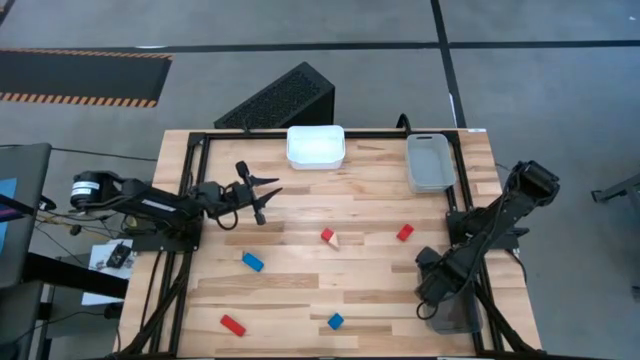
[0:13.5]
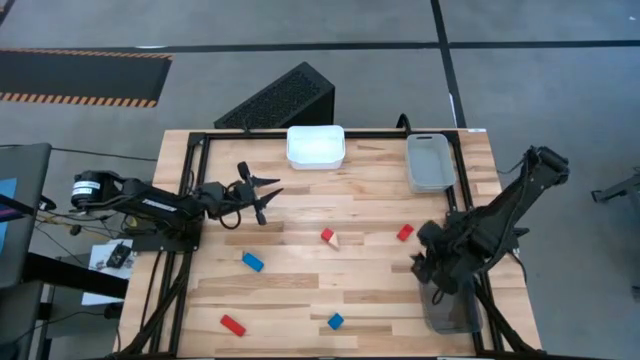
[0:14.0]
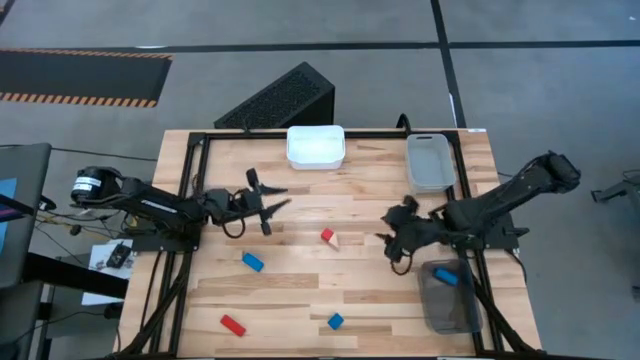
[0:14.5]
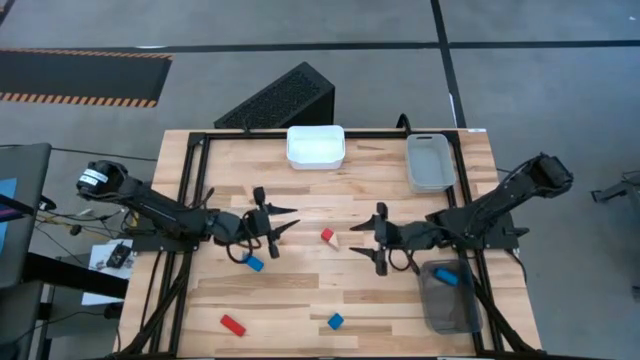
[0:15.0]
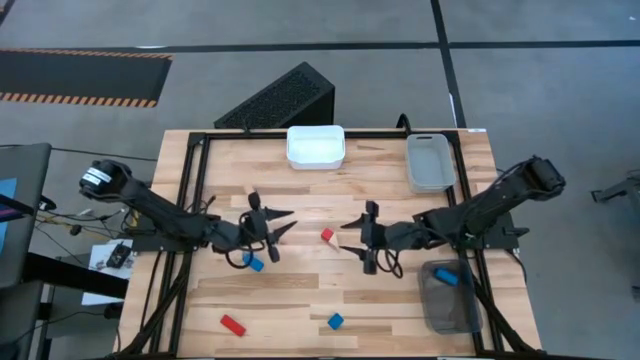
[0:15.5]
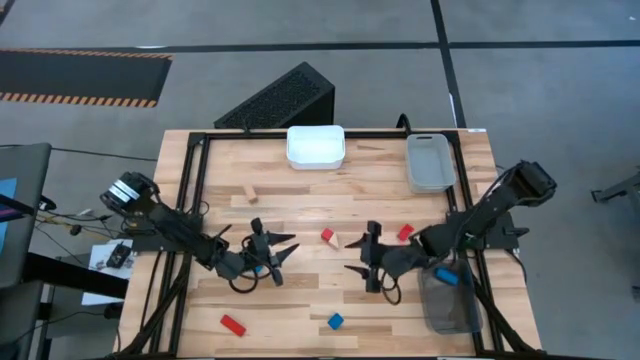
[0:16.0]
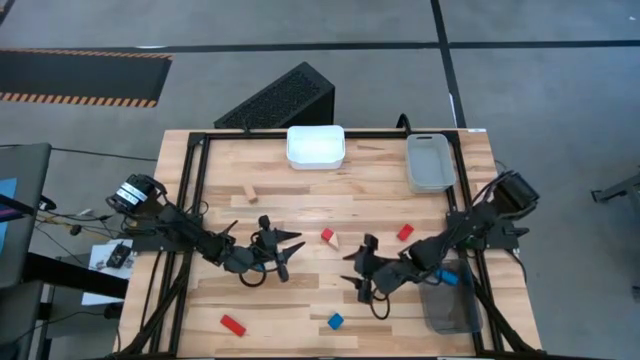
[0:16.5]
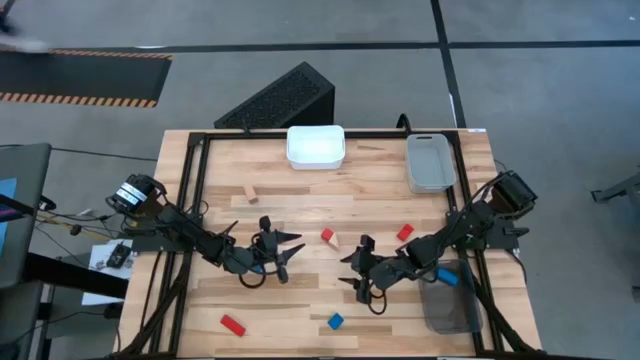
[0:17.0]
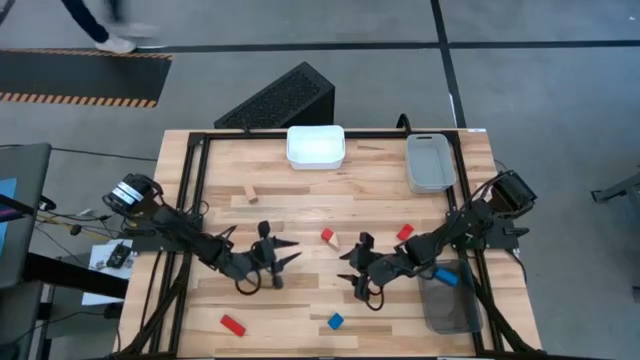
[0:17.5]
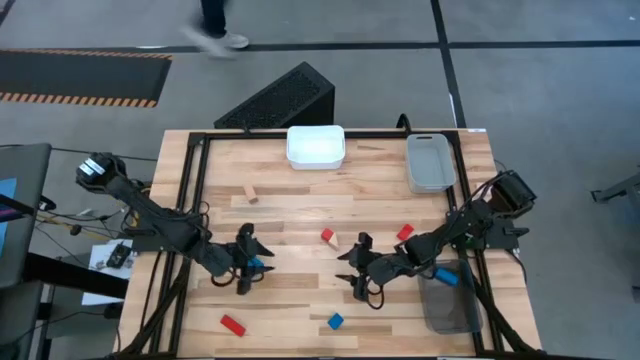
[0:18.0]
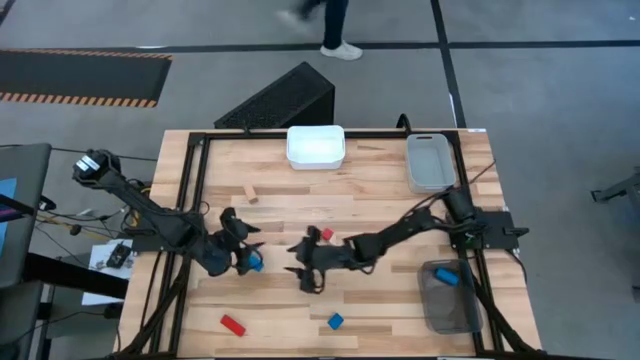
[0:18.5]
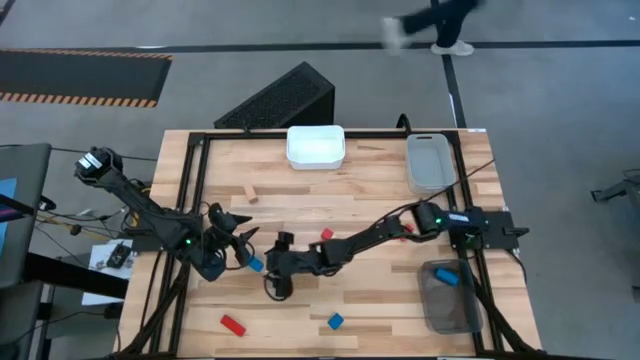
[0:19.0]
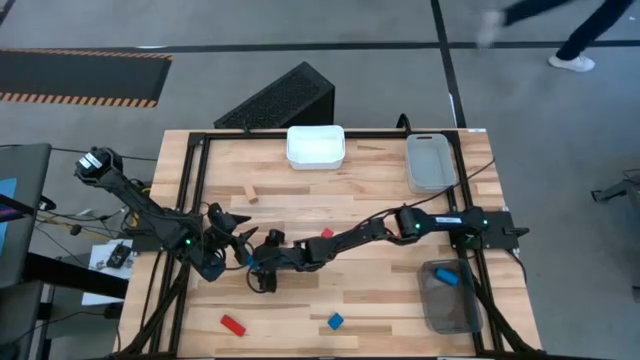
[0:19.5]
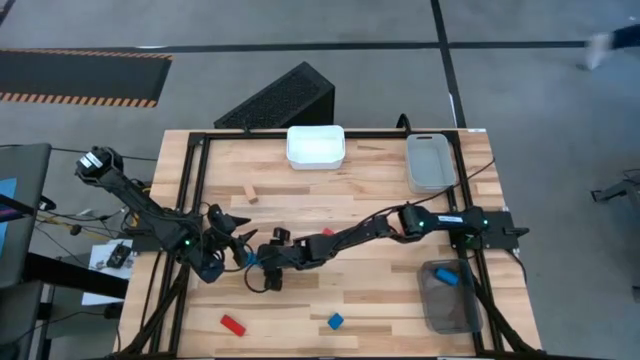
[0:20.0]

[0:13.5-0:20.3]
Task: Sort & place blocks by color
Put the top blue block into the black bin

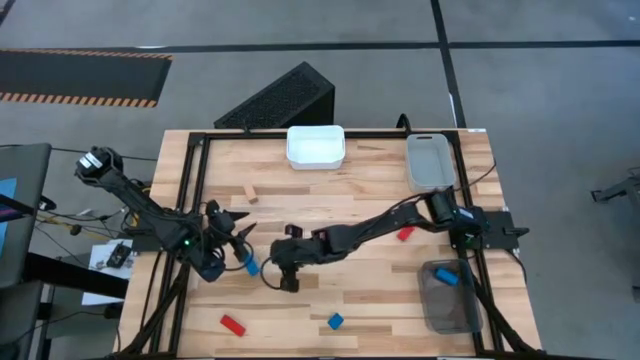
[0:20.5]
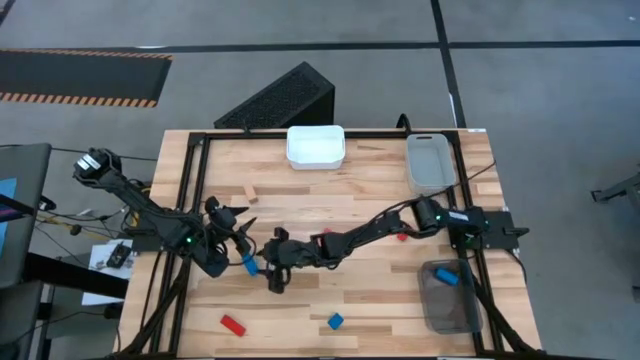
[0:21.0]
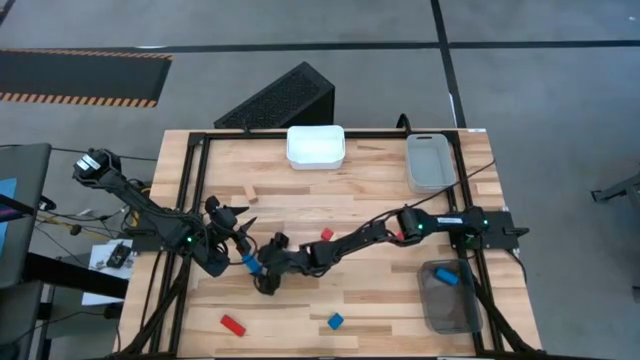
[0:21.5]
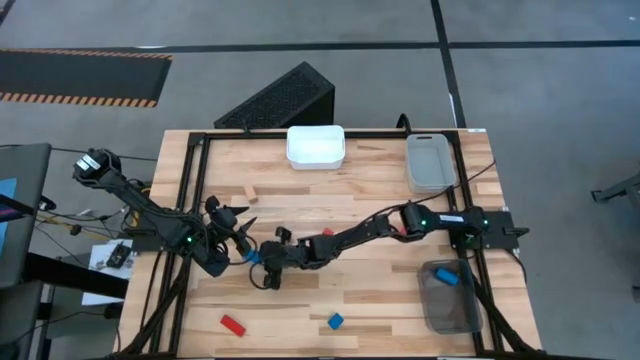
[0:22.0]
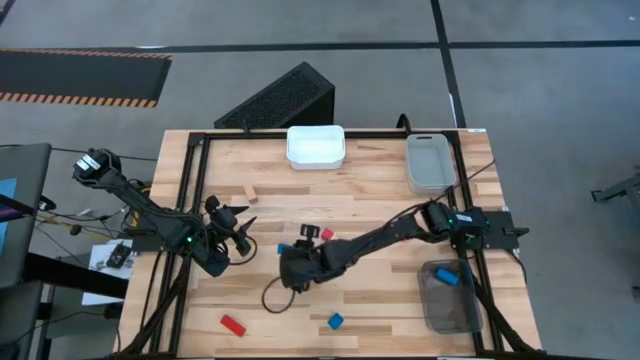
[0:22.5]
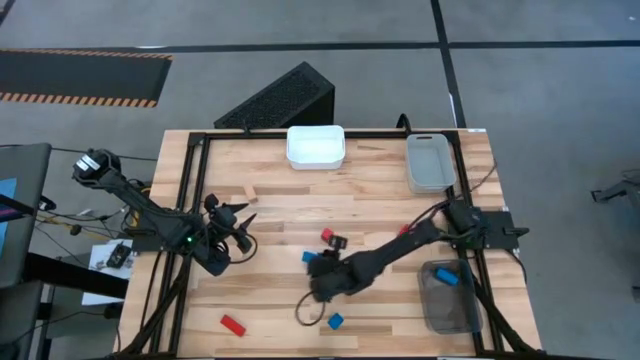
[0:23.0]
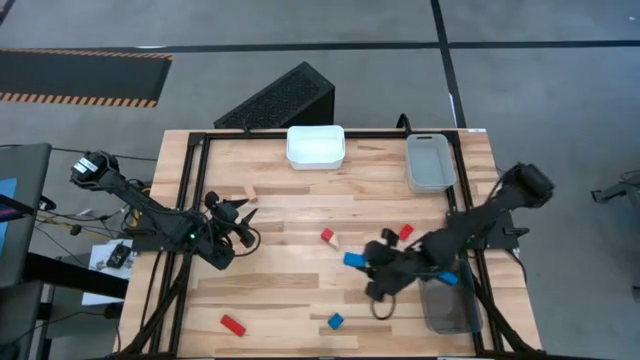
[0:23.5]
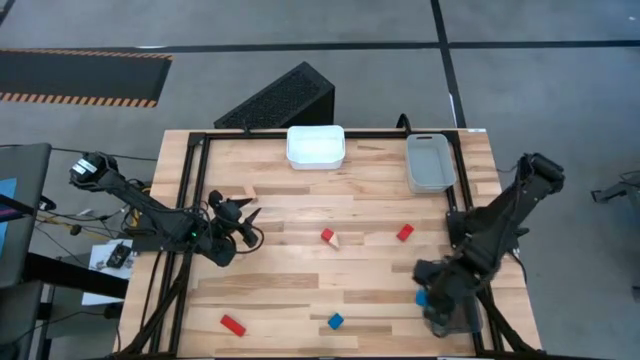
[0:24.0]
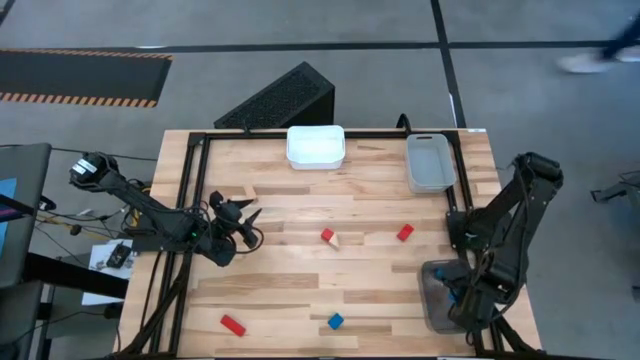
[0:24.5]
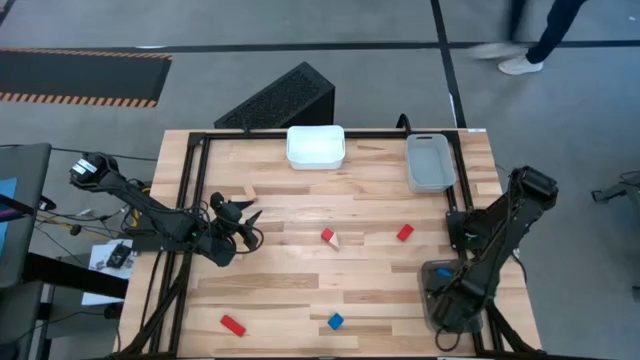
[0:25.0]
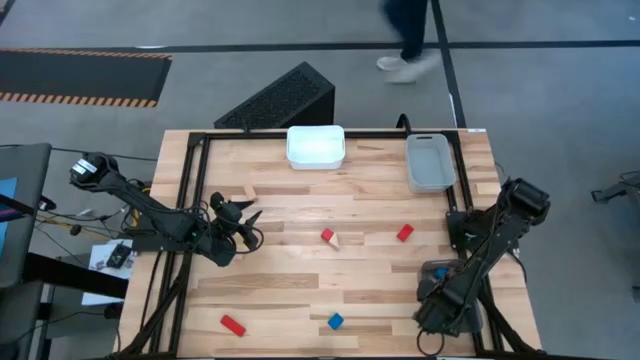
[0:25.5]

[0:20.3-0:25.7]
Put the top blue block into the black bin

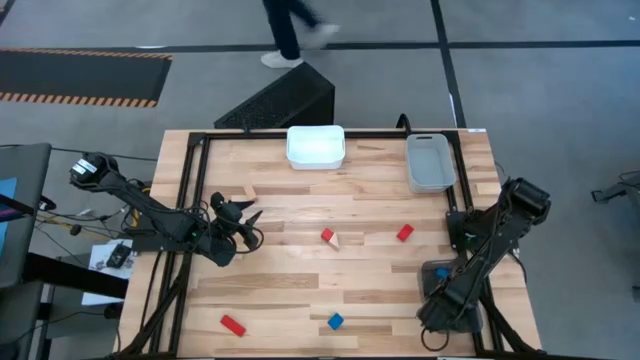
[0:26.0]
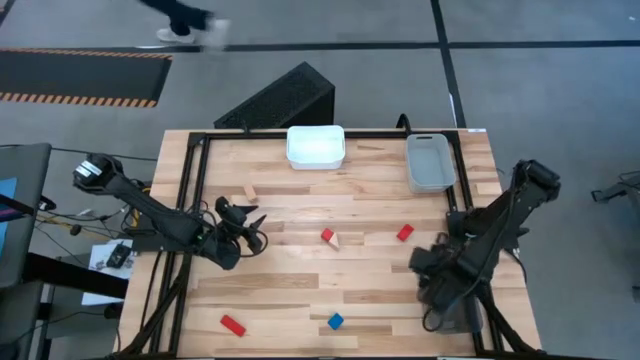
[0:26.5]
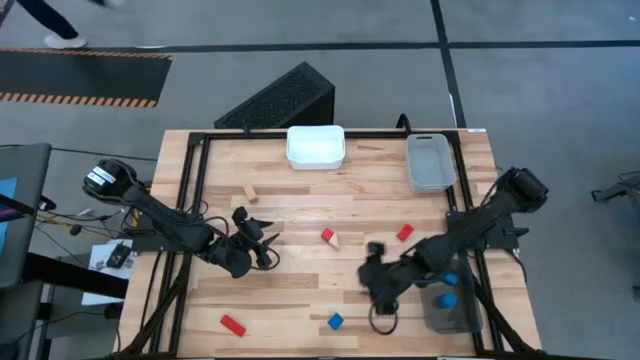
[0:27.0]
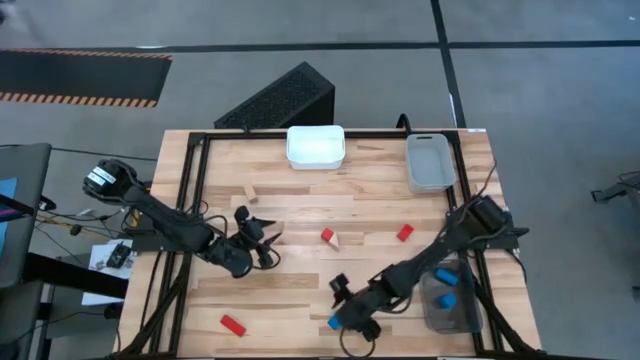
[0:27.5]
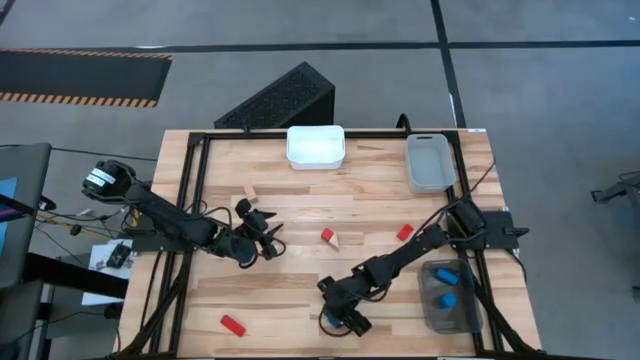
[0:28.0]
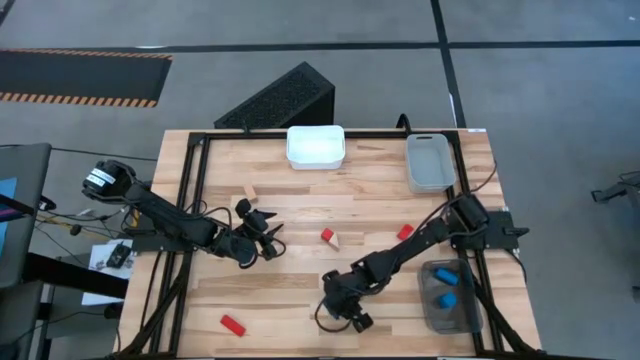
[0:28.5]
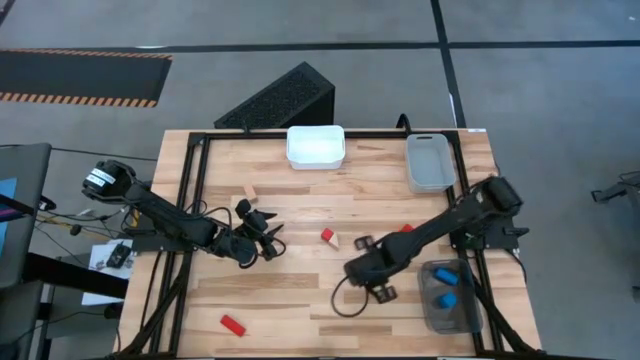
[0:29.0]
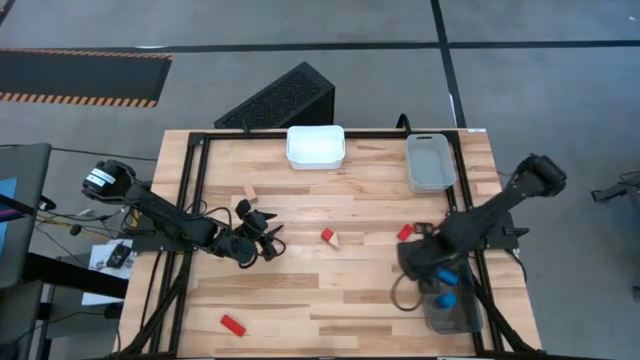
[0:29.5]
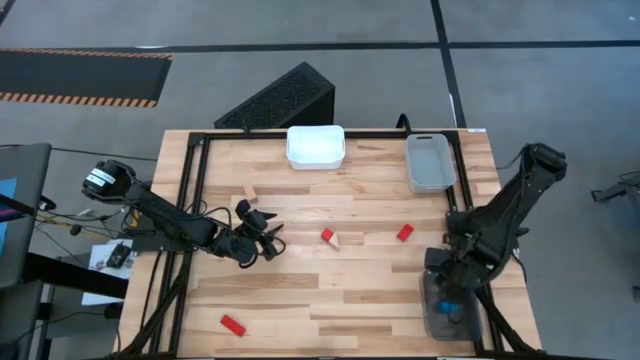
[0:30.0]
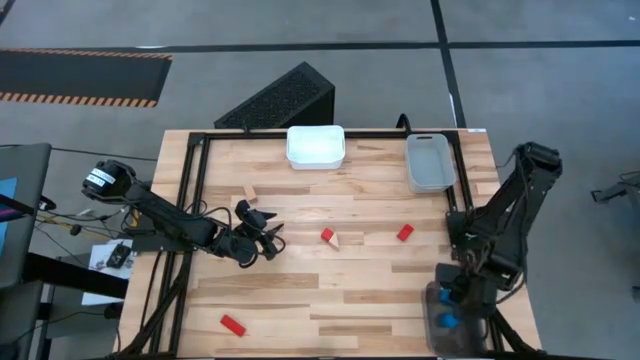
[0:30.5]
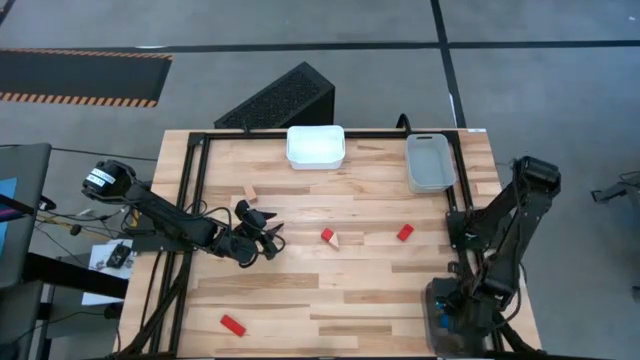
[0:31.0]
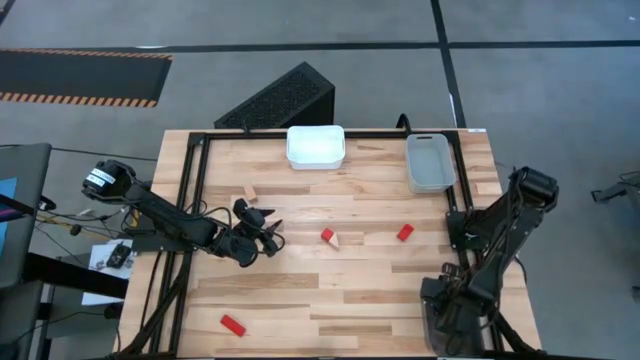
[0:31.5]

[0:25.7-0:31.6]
Put the blue block into the black bin

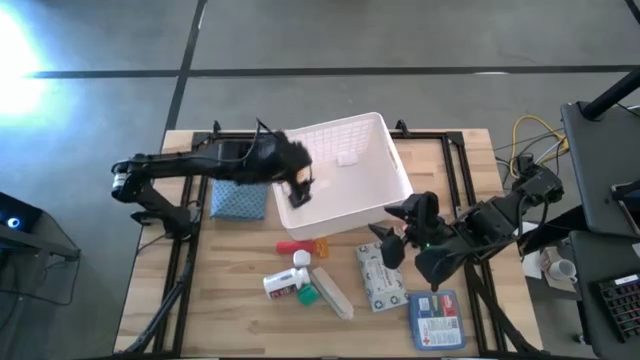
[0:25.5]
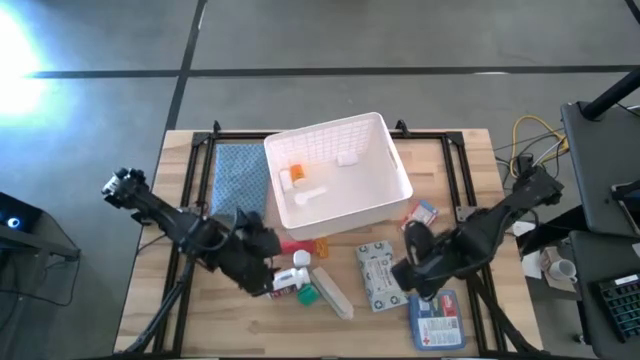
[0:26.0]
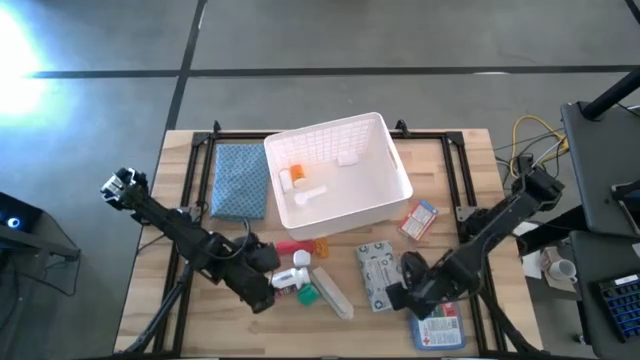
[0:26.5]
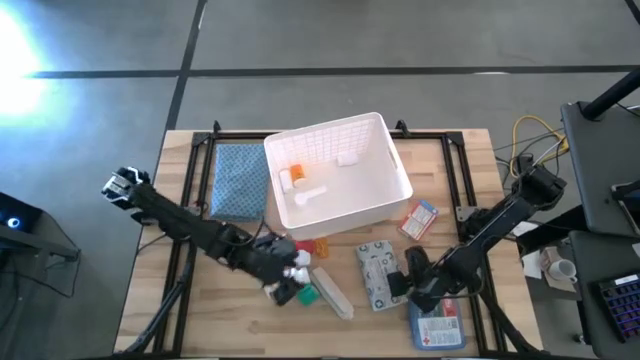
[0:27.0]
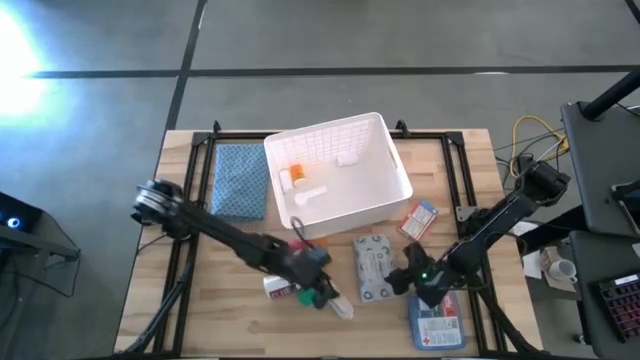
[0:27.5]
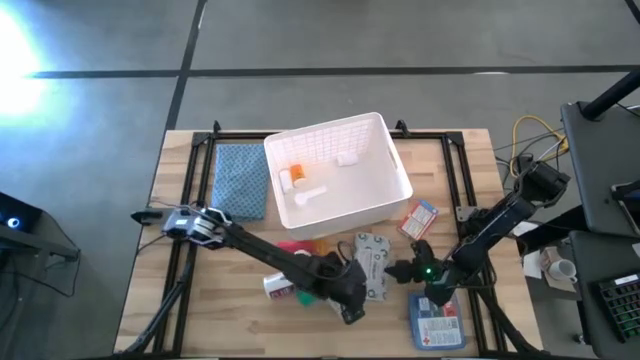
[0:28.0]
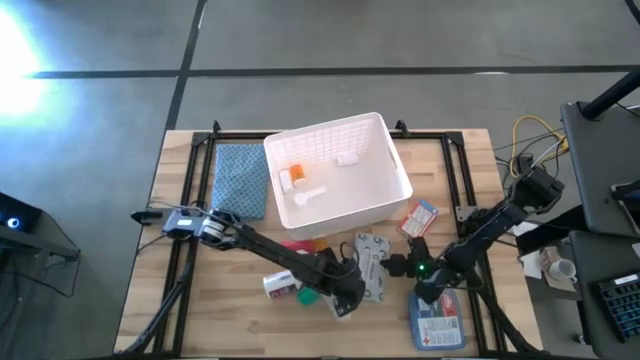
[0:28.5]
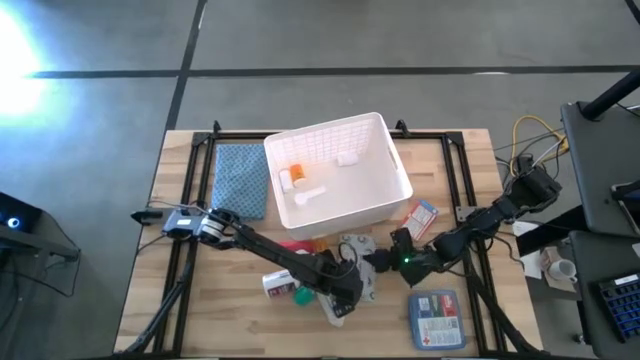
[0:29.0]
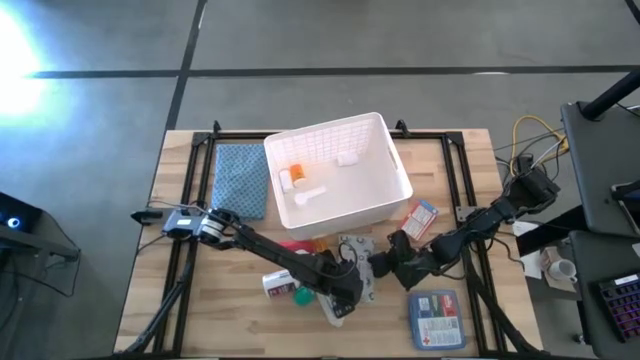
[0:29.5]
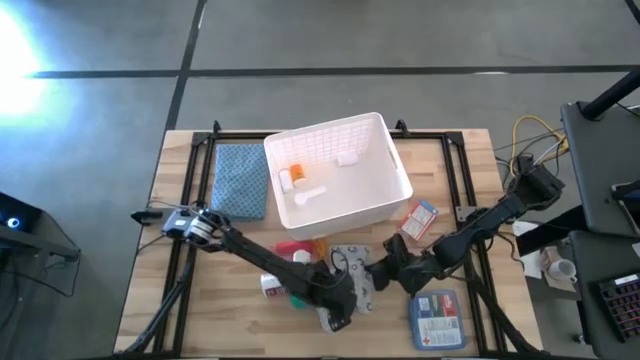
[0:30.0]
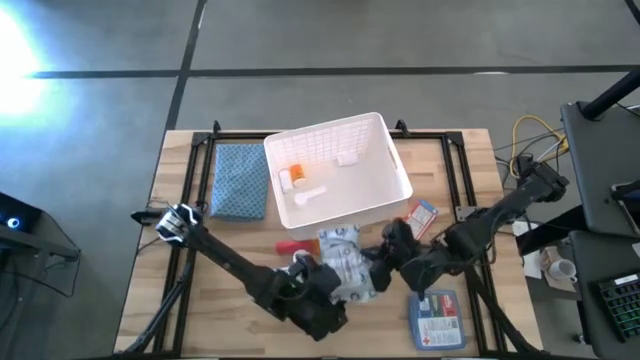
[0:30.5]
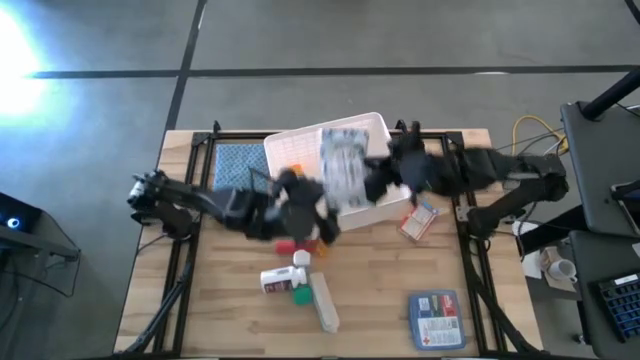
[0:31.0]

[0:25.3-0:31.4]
Task: Pick & place medical supplies in basket/bin
Put the mailer bag into the white bin
